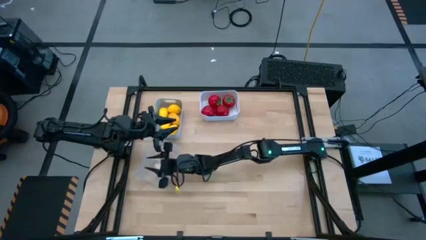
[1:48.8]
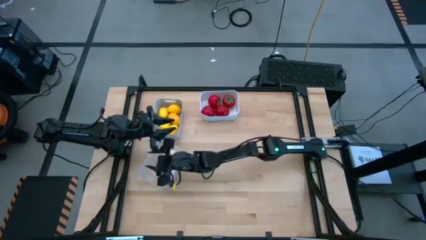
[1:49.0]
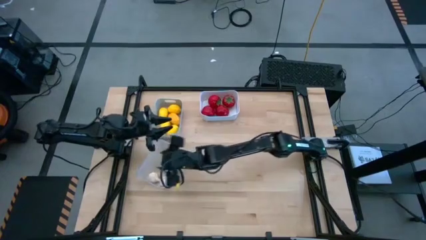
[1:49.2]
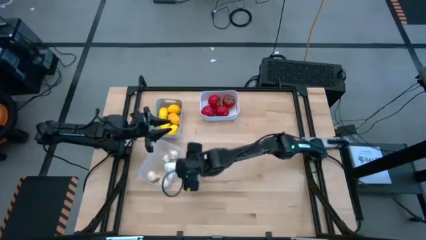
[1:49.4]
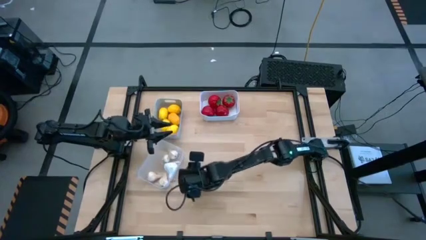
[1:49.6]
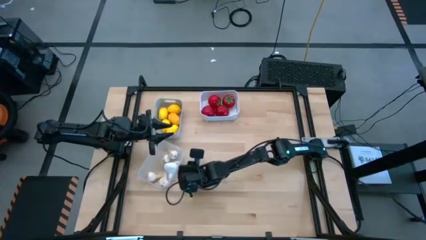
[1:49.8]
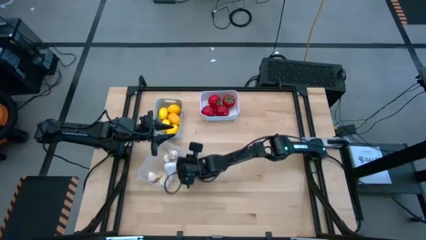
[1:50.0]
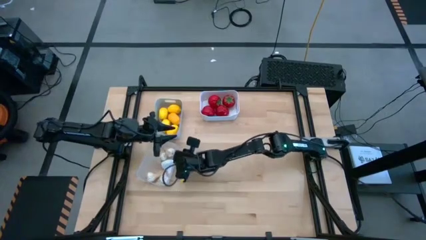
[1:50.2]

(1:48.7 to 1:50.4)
Task: Sort produce into baskets
Adjust the transparent bin

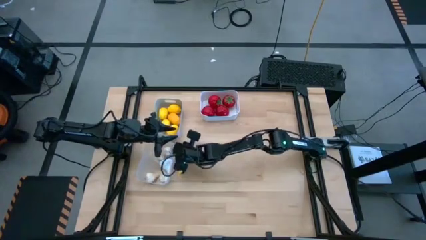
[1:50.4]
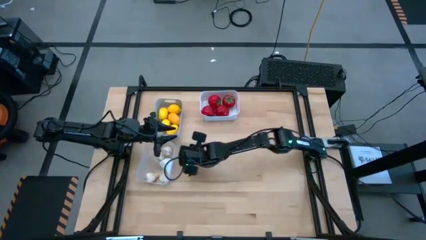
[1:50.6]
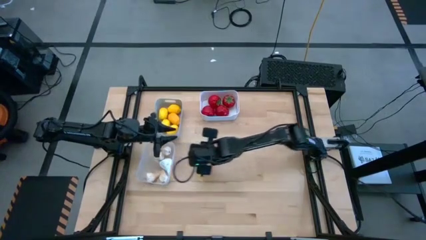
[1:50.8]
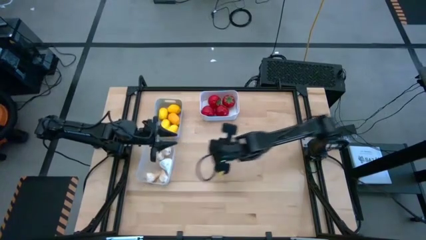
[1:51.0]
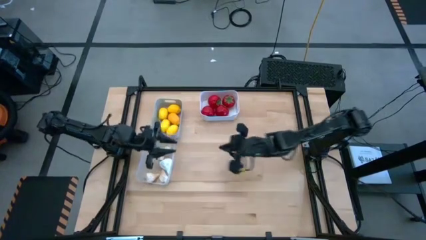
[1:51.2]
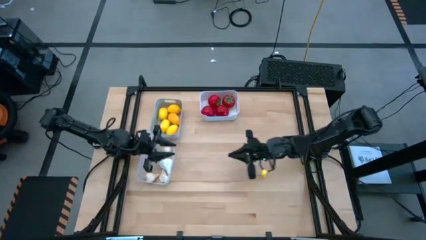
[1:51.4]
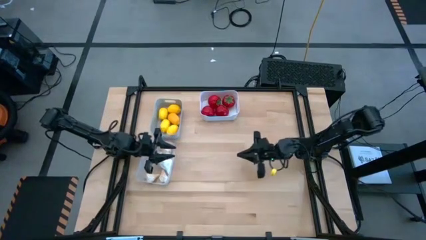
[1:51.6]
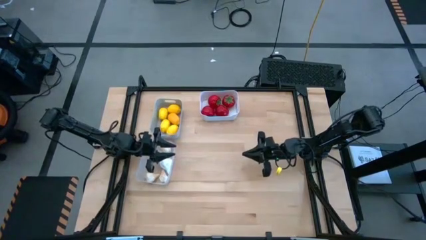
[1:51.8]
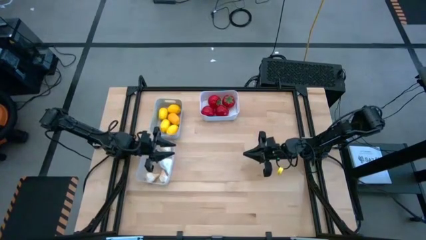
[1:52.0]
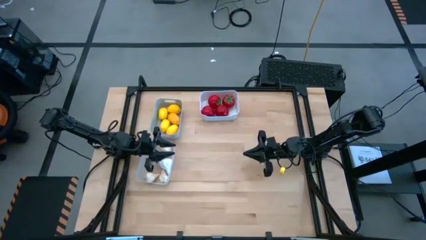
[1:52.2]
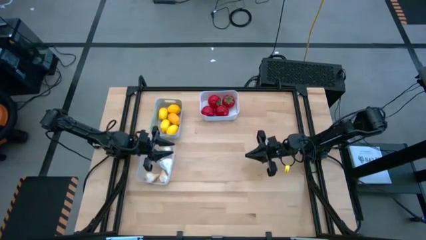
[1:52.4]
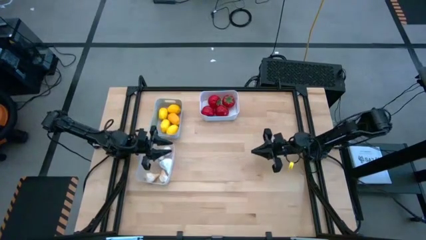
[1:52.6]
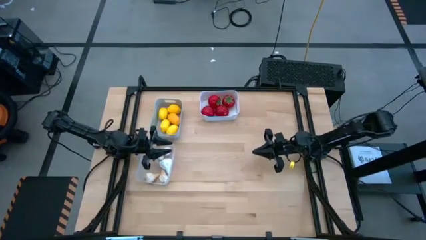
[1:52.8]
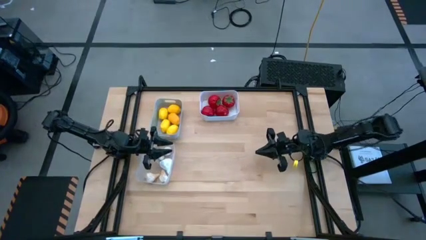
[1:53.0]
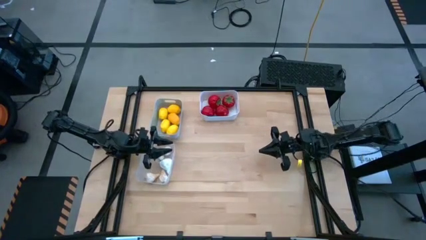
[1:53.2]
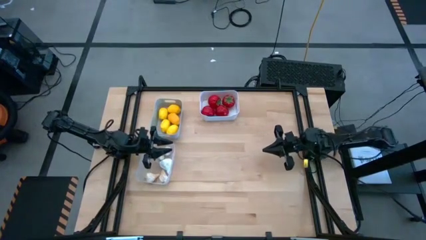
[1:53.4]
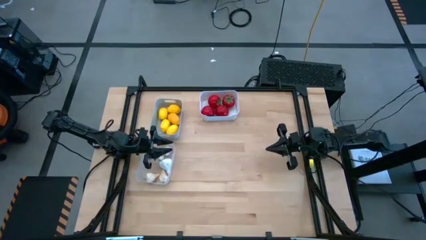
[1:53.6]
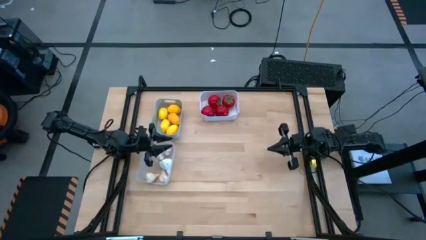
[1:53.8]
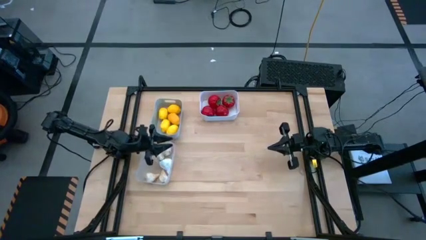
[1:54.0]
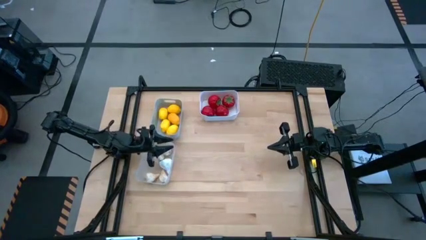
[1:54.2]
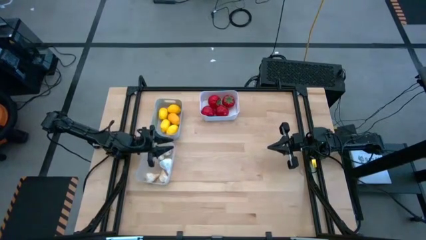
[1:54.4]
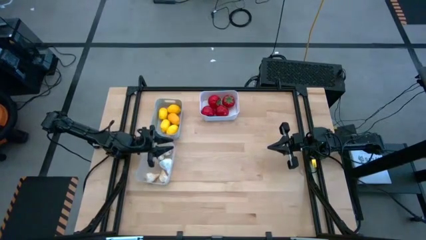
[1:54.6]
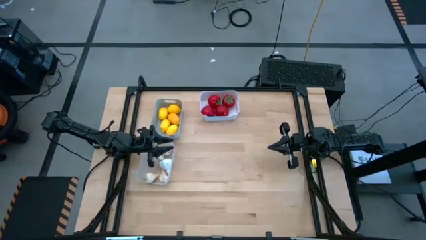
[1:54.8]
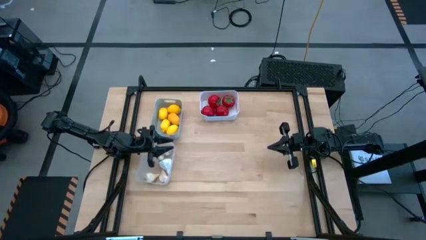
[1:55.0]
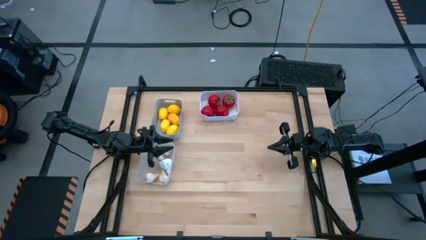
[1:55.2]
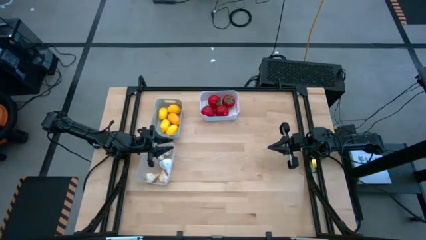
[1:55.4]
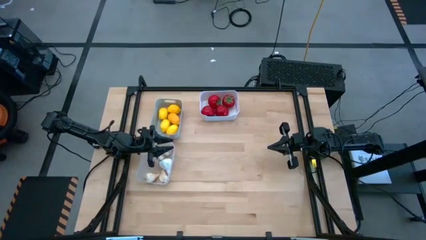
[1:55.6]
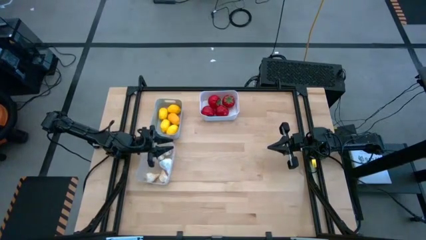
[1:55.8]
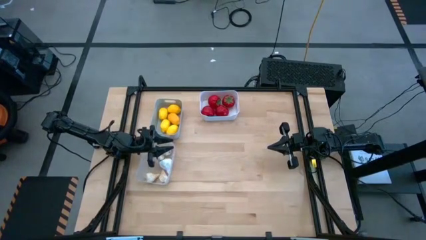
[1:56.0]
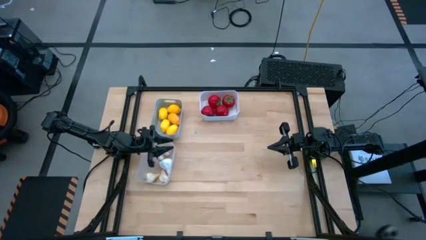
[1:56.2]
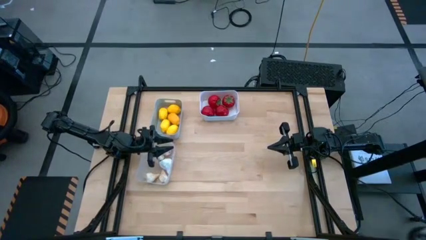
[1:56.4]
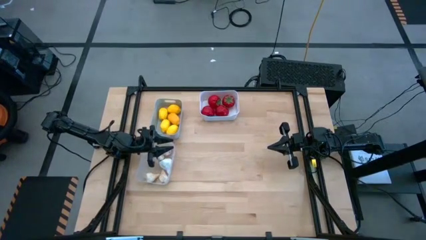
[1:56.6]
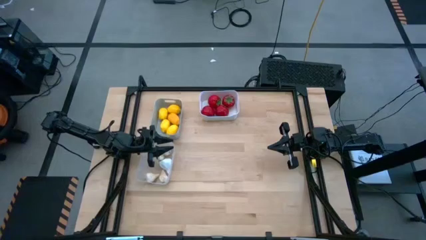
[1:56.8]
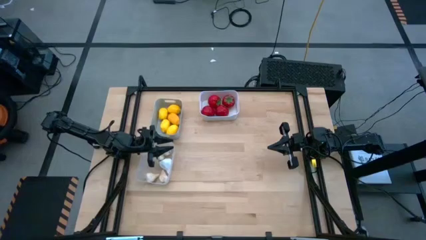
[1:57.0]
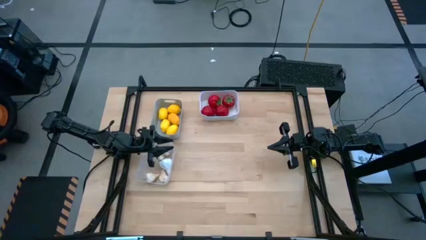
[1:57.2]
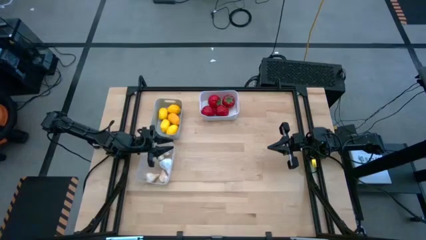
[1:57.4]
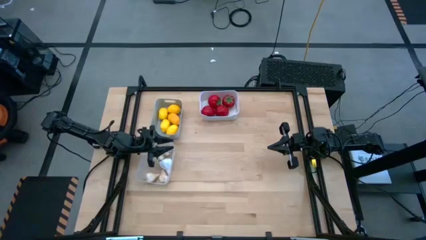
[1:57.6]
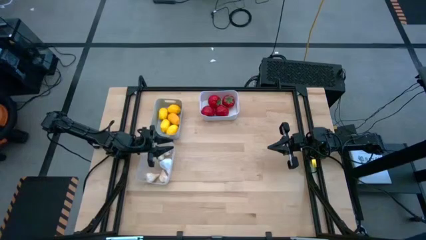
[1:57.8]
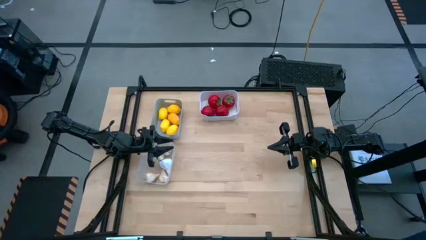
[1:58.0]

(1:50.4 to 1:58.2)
Return to Home Position

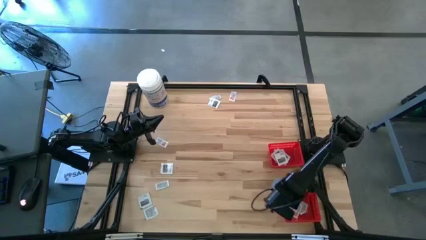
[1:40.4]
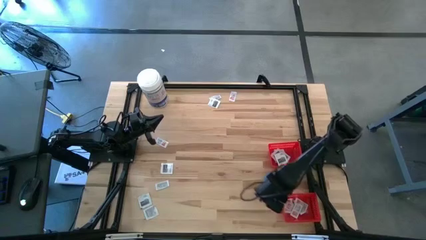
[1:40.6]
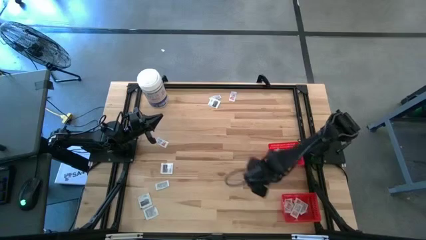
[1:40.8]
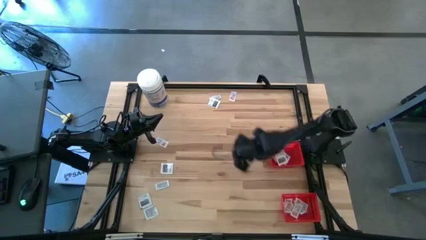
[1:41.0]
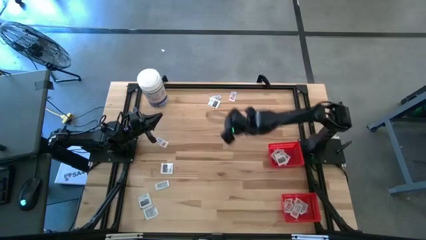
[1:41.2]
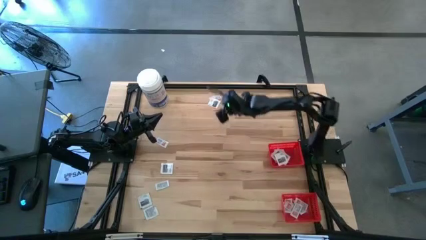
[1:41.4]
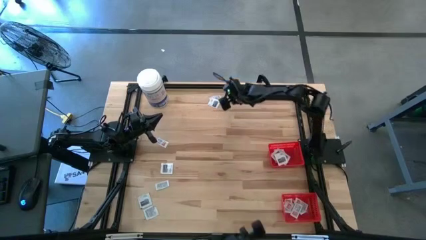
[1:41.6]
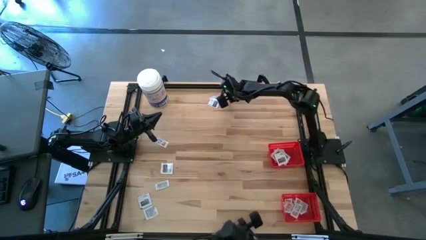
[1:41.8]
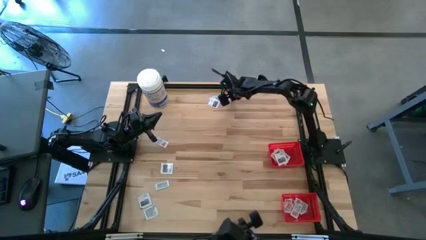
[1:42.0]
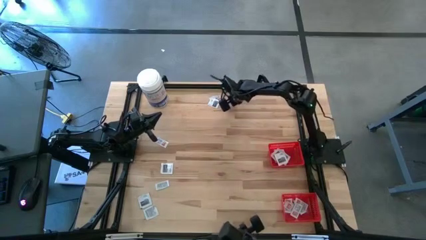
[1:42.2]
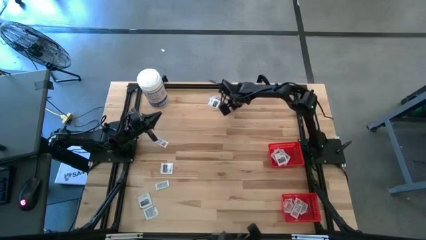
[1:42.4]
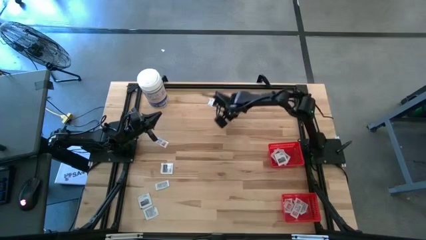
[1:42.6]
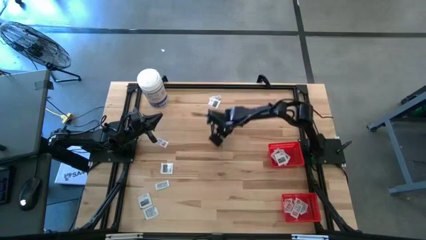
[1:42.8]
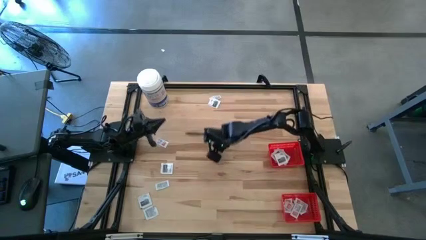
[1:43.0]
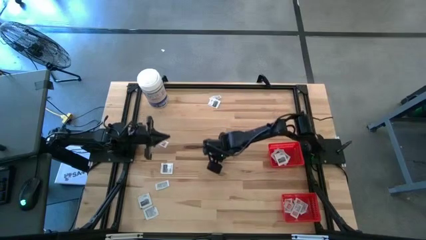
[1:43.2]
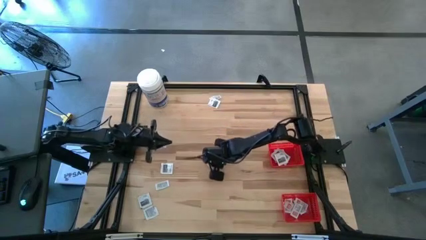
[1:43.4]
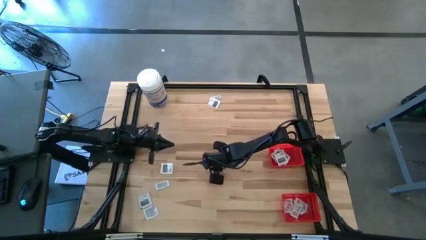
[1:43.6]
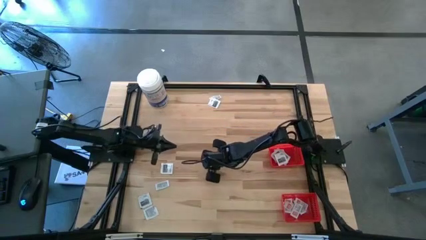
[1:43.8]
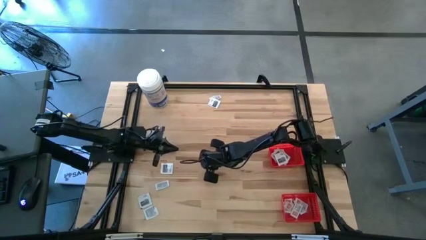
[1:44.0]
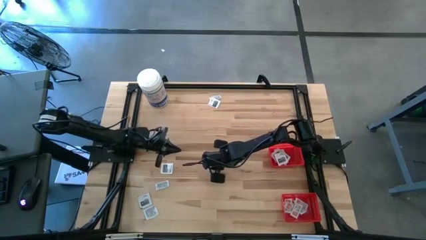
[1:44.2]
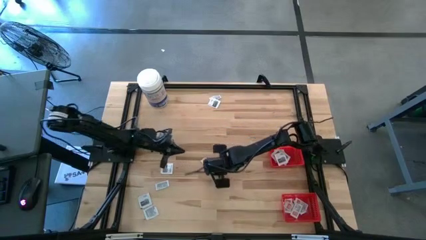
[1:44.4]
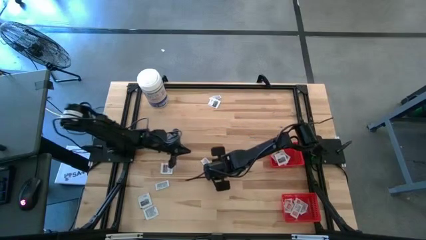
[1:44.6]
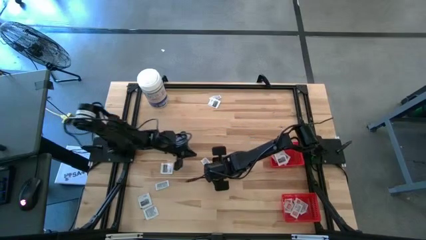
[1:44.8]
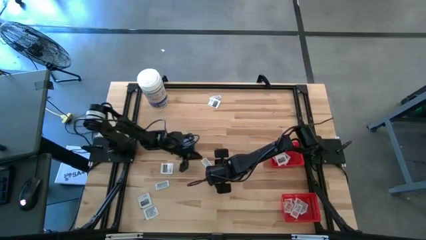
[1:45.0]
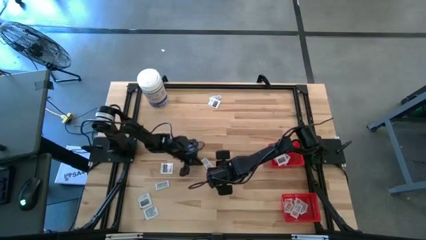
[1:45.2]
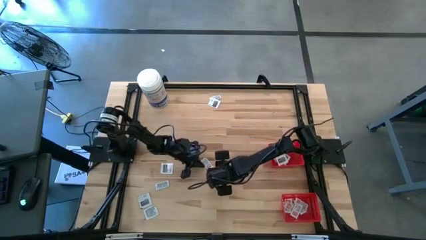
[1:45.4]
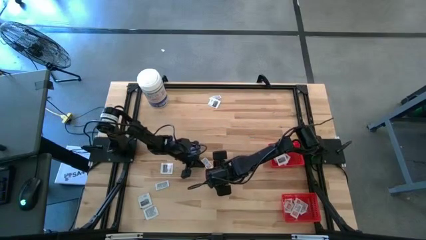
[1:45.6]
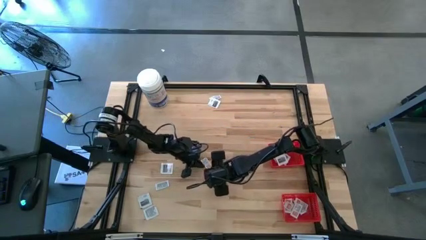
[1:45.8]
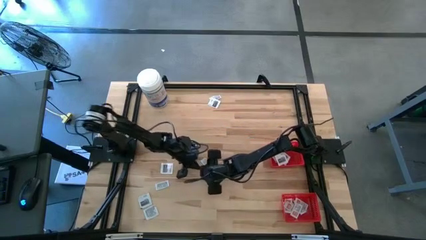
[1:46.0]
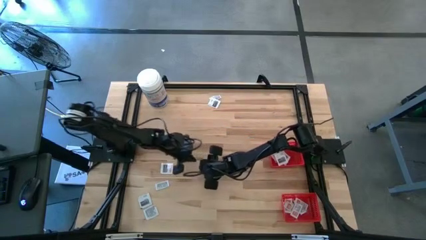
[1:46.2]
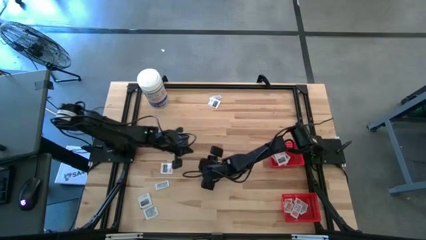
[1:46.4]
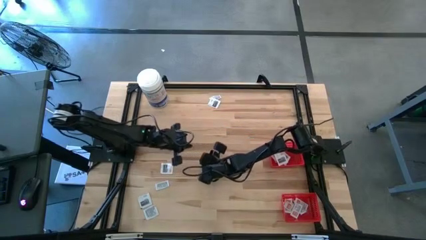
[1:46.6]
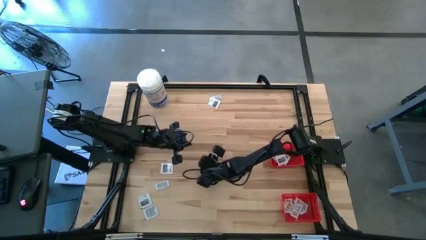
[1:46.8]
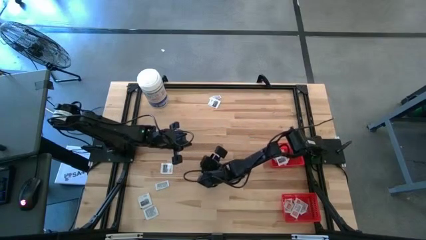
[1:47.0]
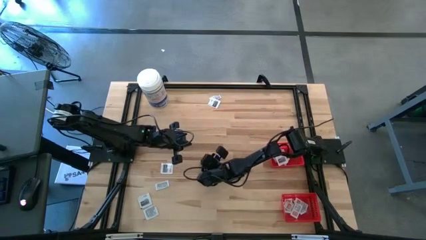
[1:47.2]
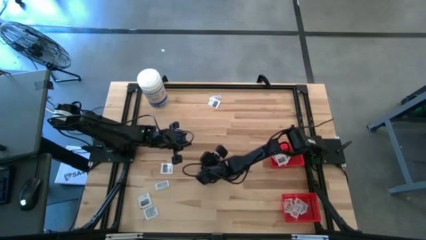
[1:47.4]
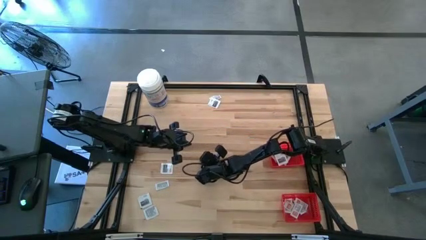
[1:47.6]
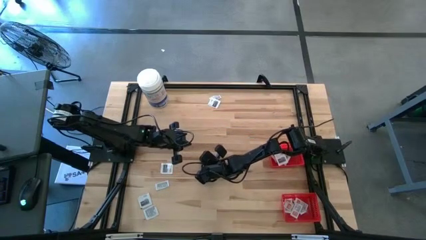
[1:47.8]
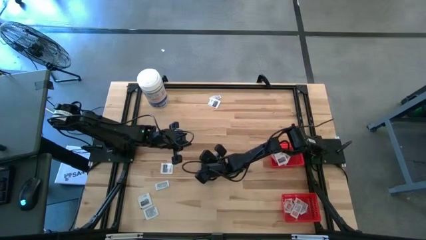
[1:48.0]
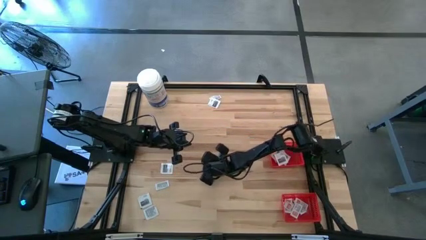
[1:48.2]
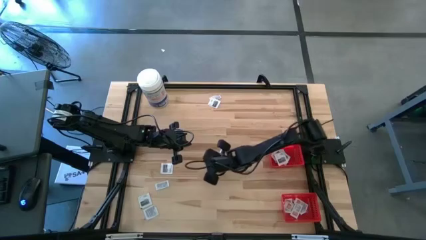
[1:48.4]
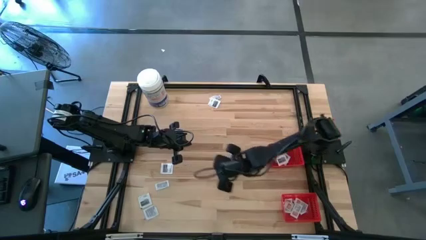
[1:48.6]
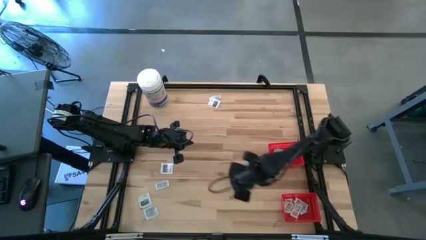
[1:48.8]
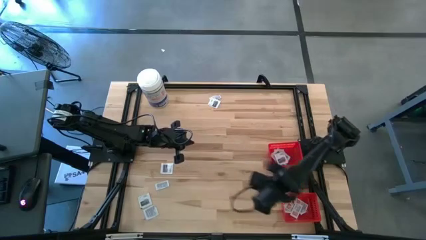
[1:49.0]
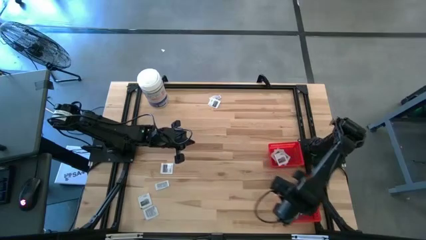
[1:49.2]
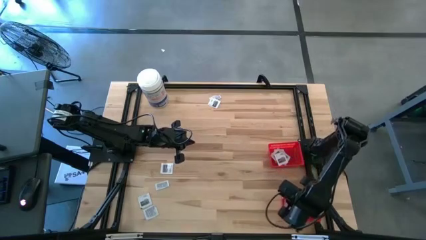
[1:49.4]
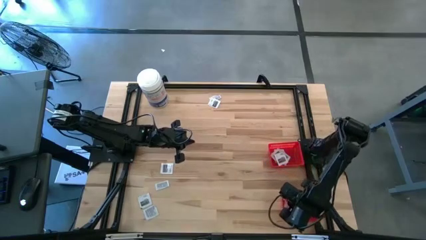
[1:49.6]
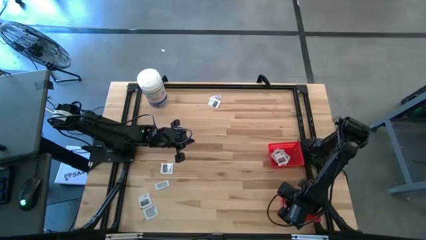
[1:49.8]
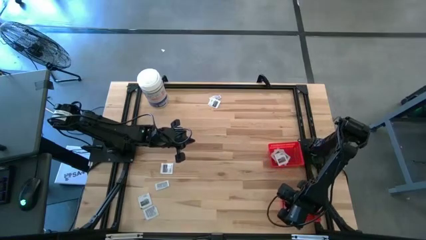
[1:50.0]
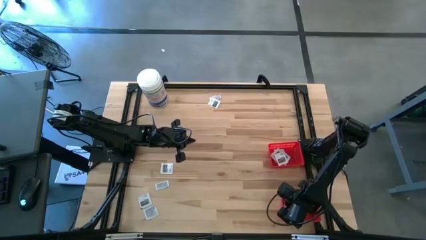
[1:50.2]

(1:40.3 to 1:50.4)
Task: Pick & Place First Aid Supplies
Put the orange ointment pack into the bottom red basket
